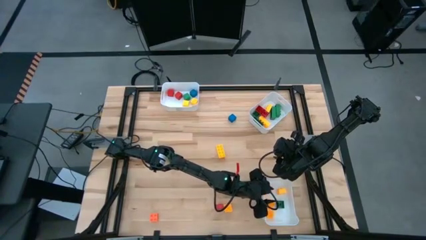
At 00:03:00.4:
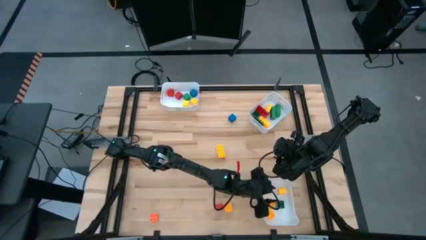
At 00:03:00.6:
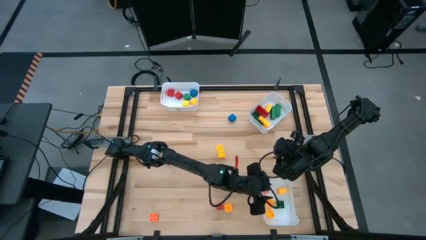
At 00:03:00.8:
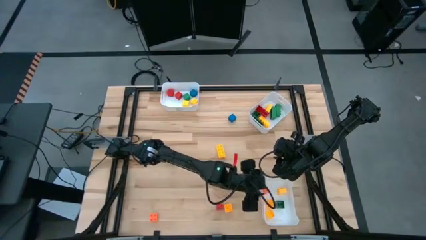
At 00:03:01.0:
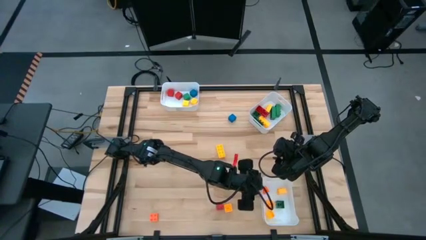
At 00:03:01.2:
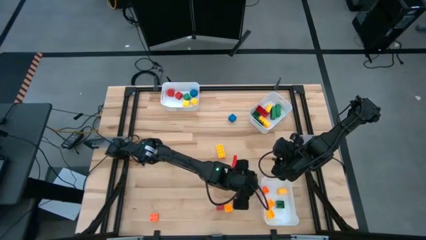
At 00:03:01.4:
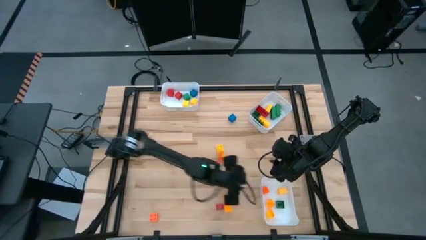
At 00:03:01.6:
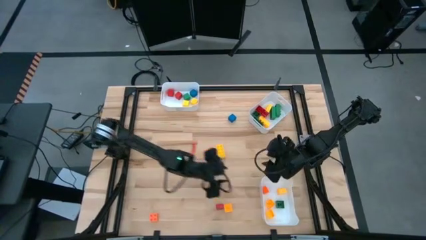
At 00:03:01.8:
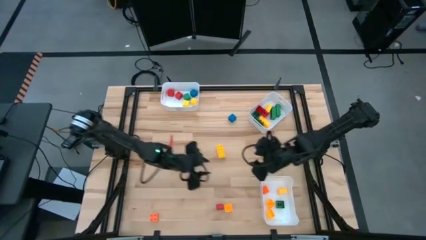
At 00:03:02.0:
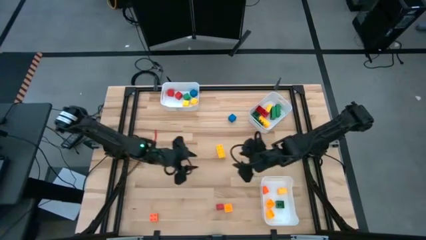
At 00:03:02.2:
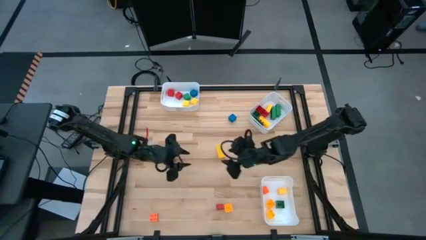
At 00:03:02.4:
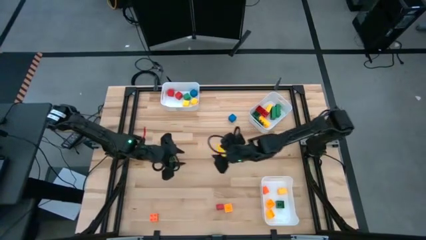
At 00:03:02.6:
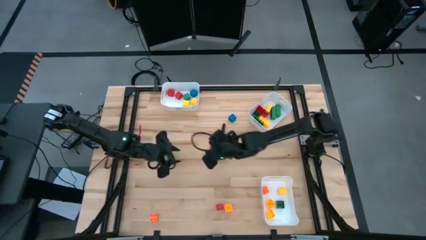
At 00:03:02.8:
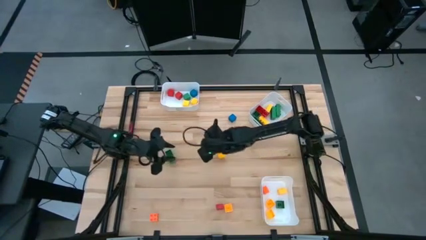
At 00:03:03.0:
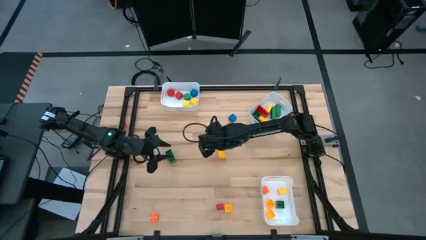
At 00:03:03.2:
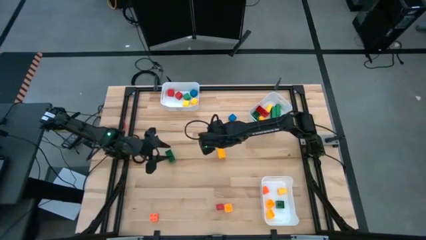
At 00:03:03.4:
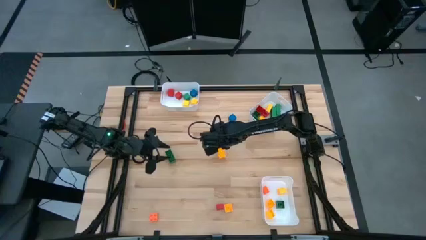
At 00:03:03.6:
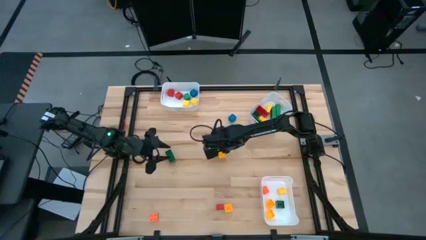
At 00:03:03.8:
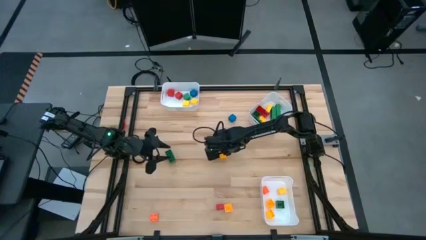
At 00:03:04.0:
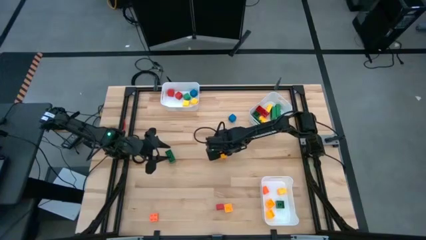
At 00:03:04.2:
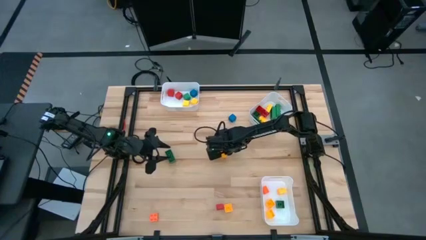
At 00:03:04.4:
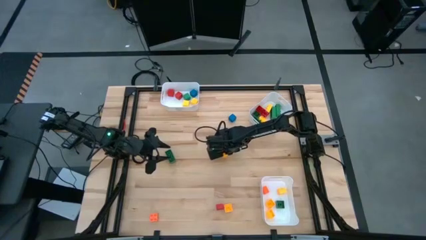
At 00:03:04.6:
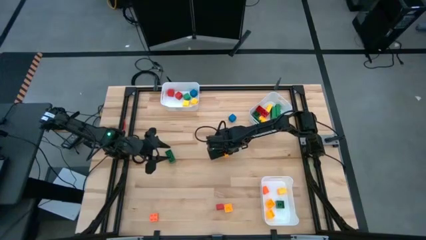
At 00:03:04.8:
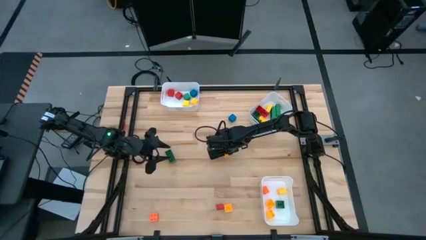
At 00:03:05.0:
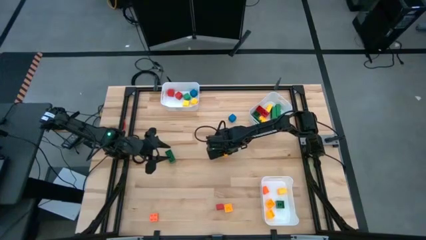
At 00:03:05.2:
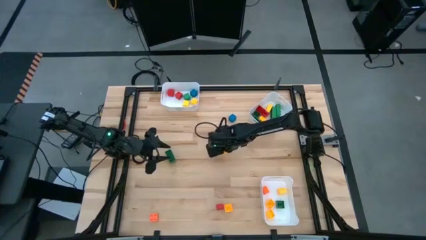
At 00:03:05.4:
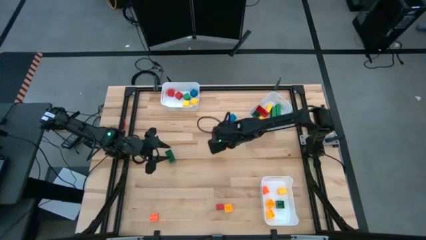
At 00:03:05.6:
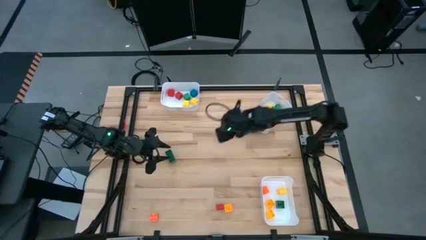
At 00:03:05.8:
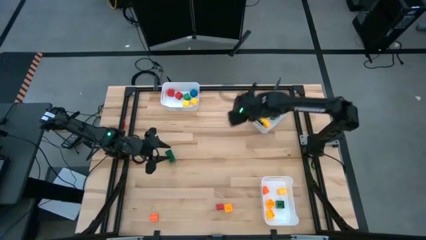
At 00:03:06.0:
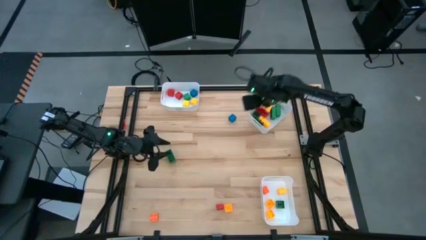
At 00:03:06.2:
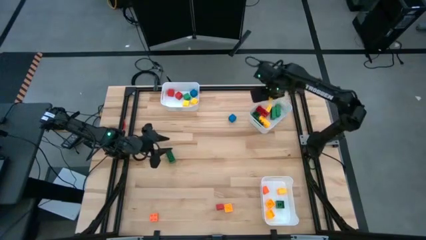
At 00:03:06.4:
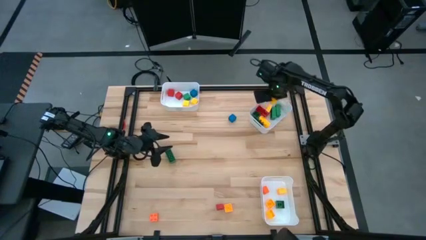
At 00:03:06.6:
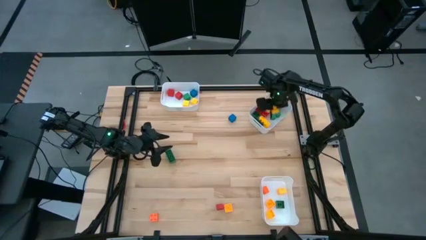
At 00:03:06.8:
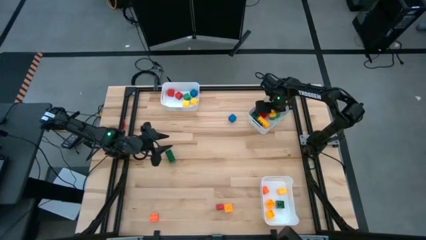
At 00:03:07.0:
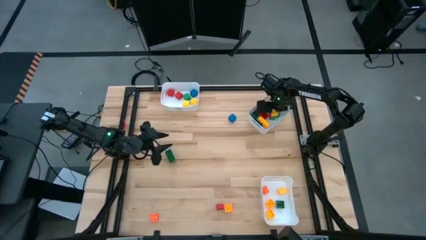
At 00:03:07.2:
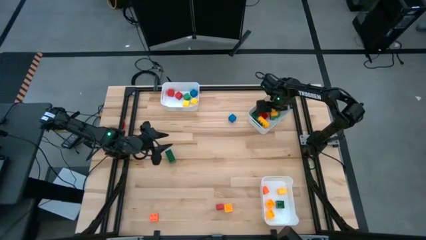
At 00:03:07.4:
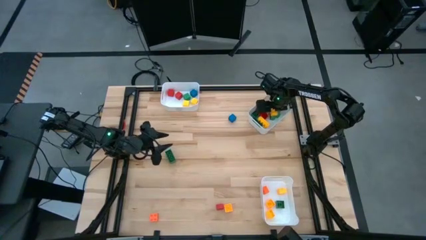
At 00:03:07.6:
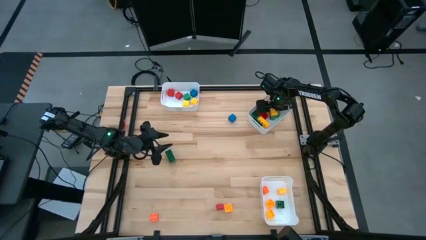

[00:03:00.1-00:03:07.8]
Task: Sort blocks by size
Put the yellow 8 stud gamepiece into the top right white bin

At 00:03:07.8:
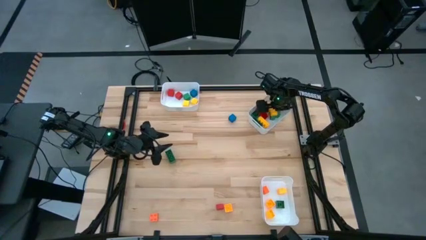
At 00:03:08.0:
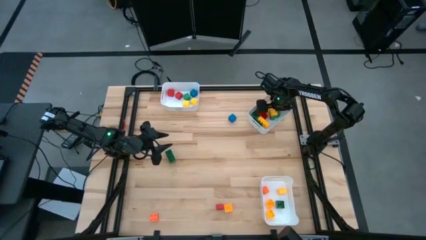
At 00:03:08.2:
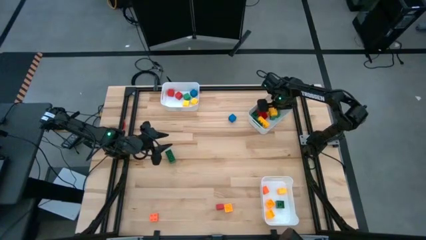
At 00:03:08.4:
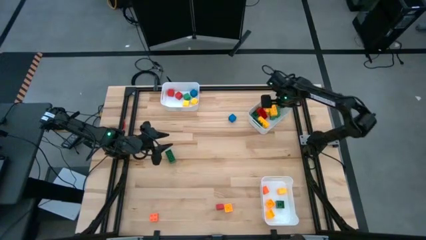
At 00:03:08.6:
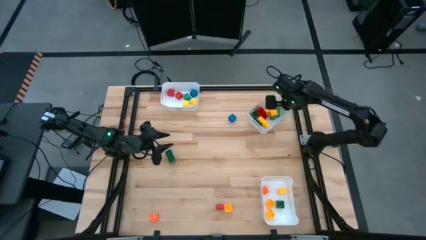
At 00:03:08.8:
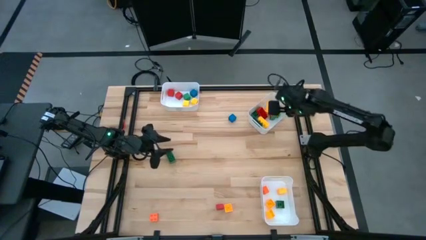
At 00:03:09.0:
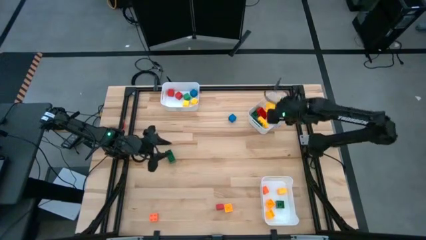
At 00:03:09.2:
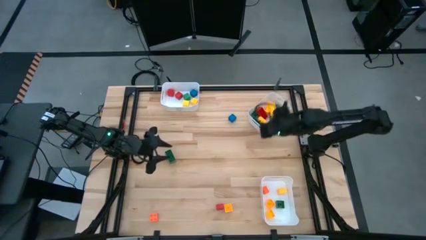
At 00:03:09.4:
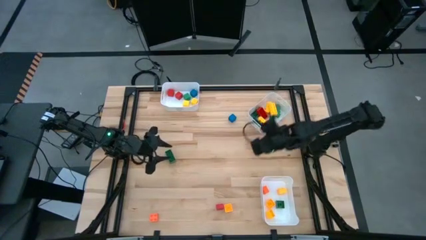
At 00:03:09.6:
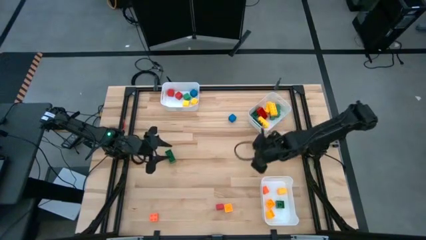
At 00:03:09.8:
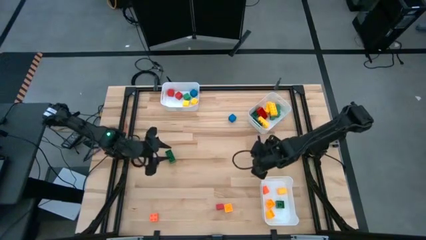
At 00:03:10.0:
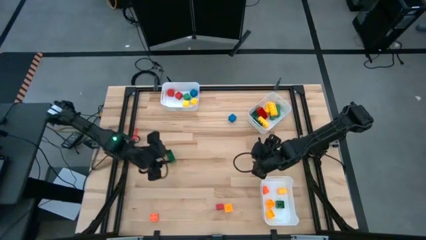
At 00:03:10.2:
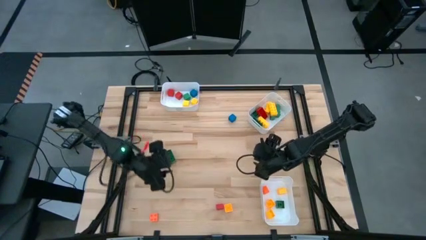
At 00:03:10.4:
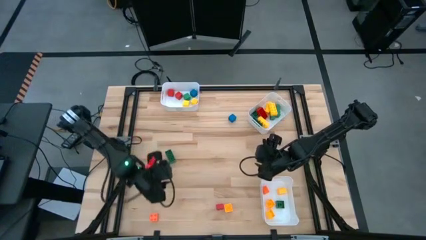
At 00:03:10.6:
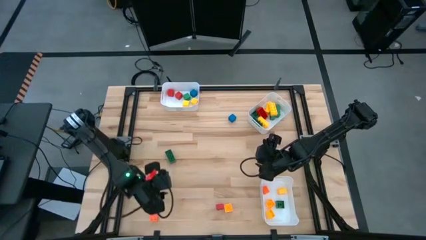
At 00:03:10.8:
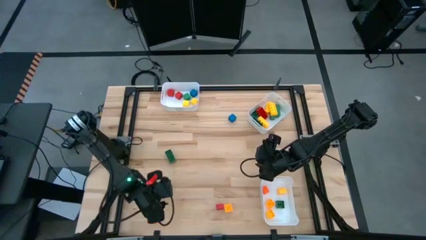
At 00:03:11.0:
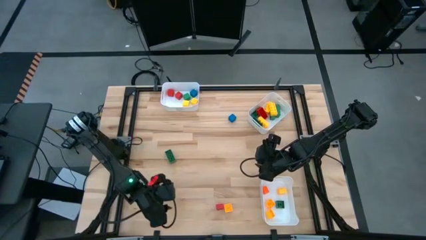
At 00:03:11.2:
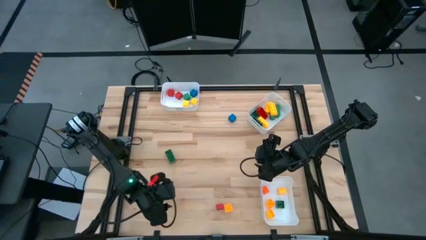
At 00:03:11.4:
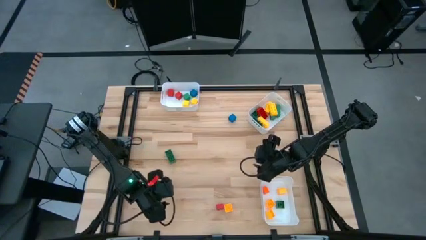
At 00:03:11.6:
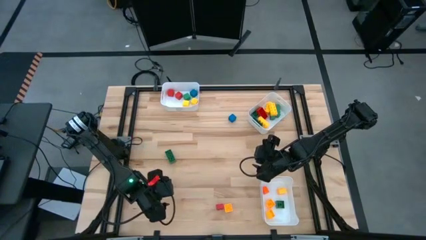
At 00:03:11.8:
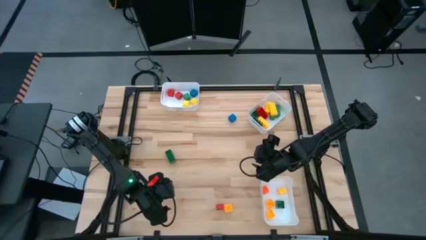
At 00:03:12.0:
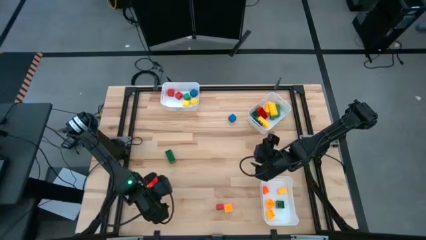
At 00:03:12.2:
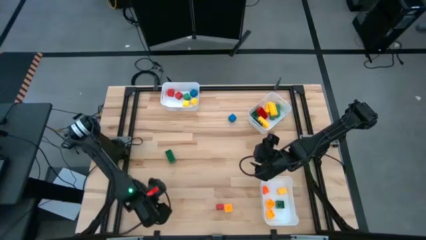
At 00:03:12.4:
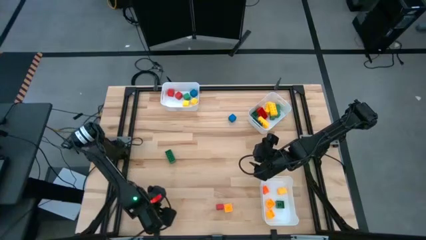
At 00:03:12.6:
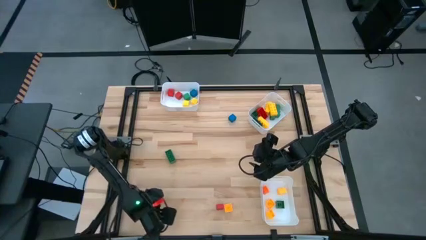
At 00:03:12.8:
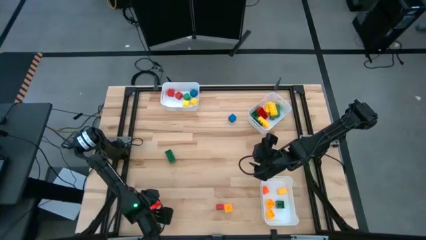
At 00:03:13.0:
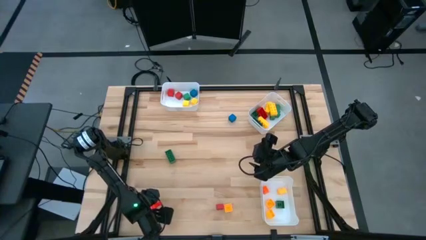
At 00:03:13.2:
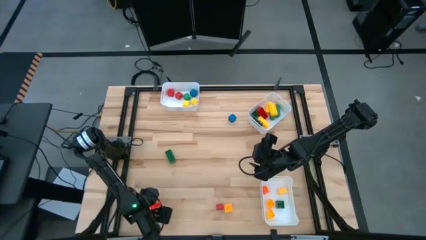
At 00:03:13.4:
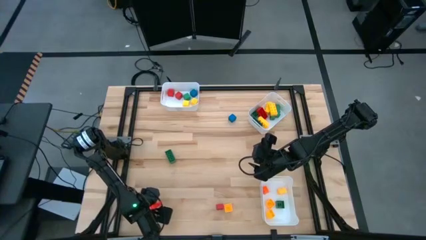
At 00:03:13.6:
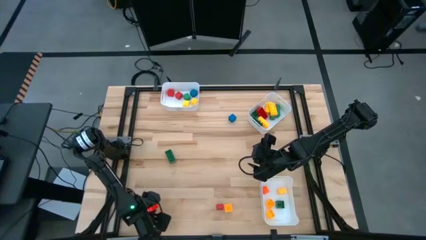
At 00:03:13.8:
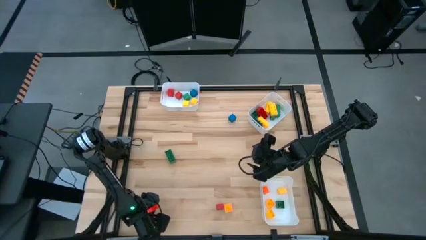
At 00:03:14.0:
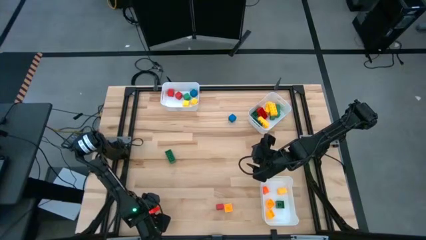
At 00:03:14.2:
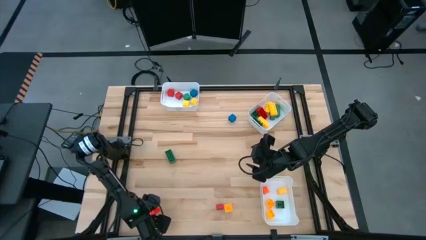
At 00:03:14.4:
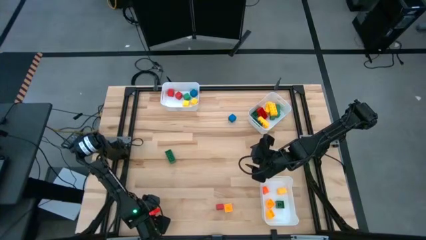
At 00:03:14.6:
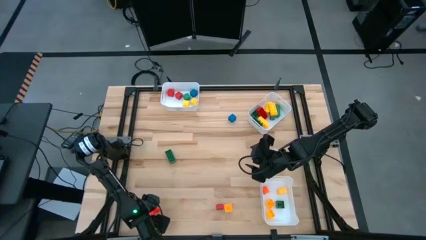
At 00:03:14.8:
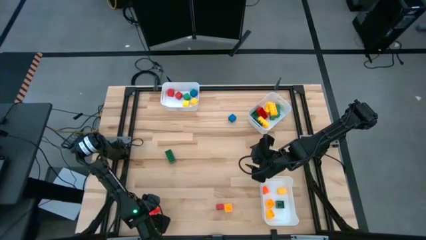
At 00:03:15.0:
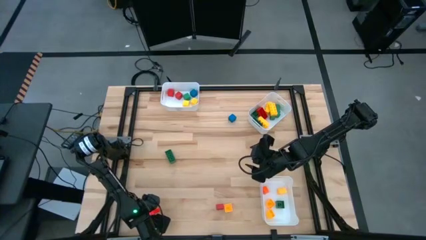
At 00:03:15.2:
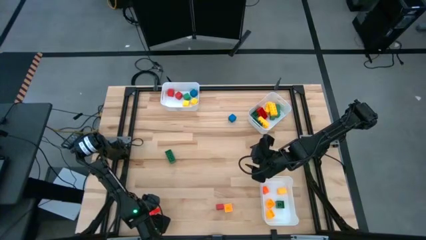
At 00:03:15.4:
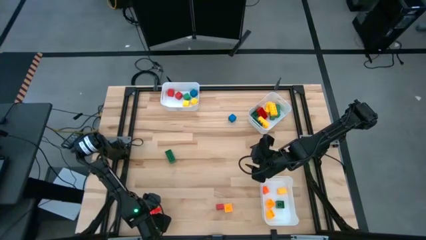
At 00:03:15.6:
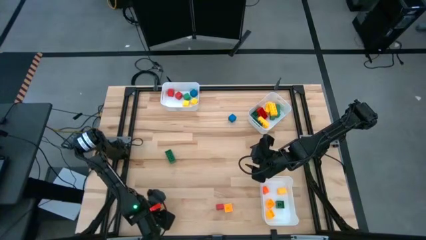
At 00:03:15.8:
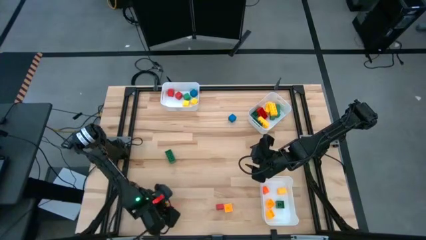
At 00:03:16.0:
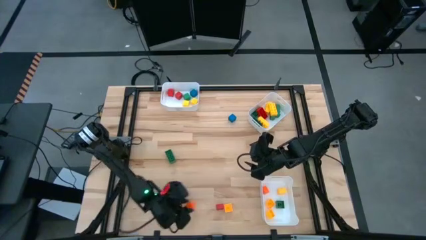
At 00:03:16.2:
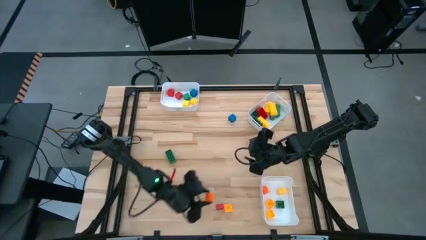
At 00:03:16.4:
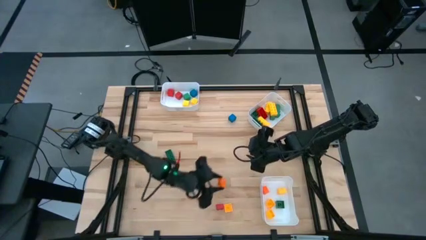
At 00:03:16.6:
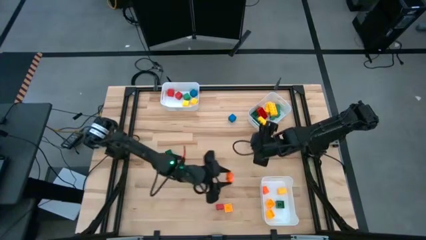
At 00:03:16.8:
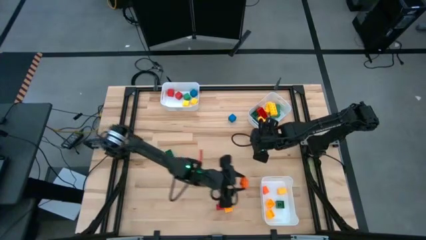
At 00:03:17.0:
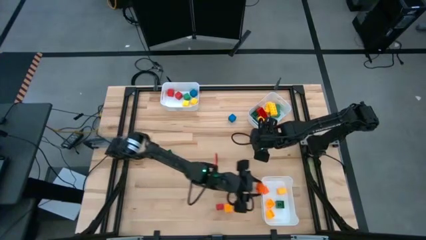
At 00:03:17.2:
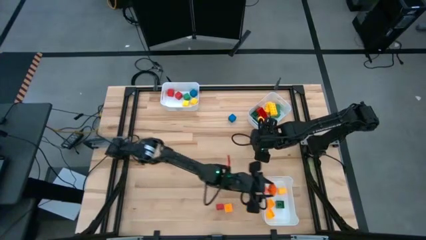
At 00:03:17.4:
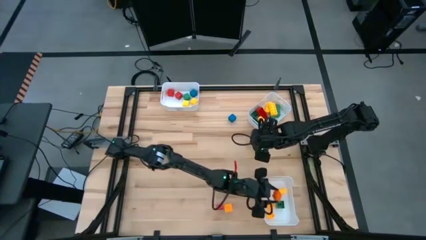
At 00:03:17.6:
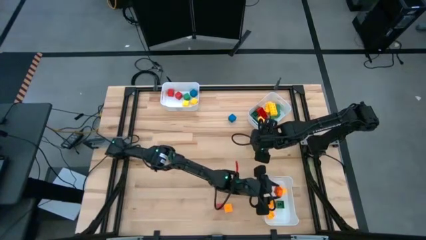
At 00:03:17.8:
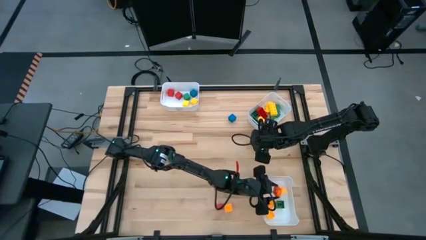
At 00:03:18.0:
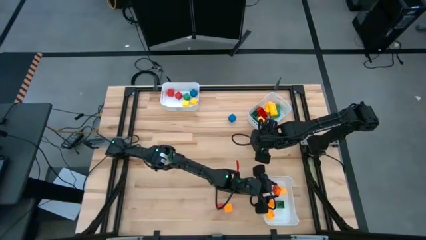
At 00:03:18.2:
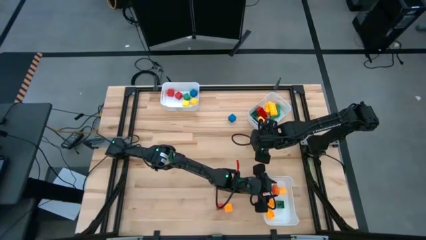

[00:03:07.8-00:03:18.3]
Put the orange 4 stud gamepiece into the bottom white bin
